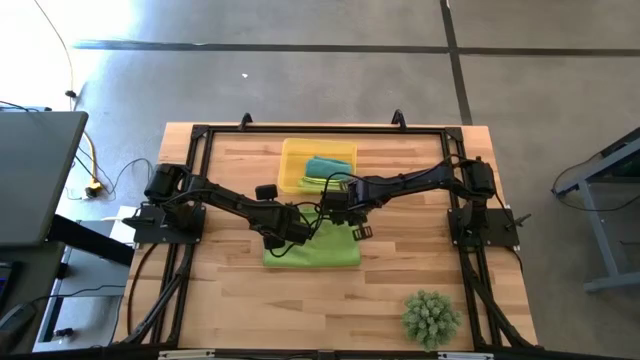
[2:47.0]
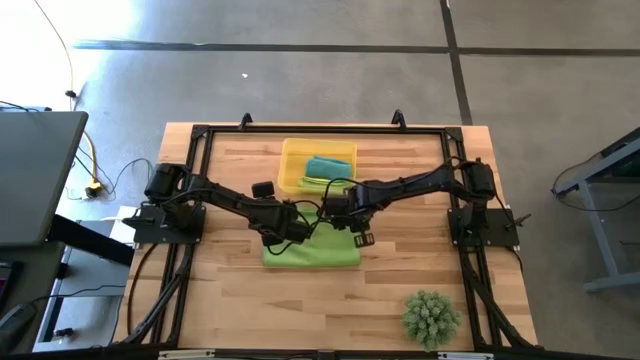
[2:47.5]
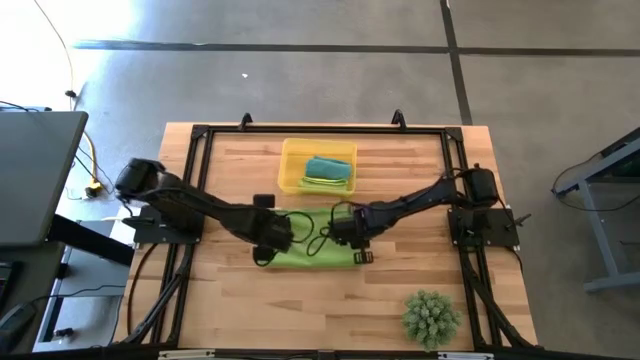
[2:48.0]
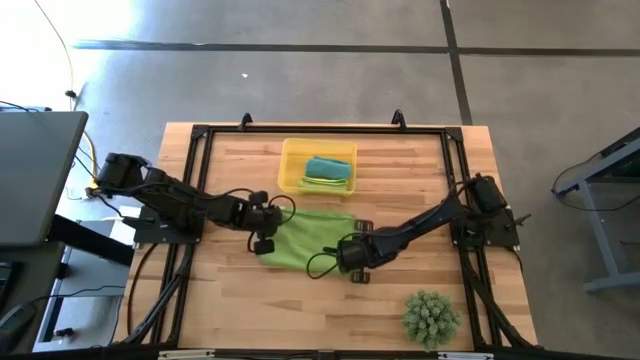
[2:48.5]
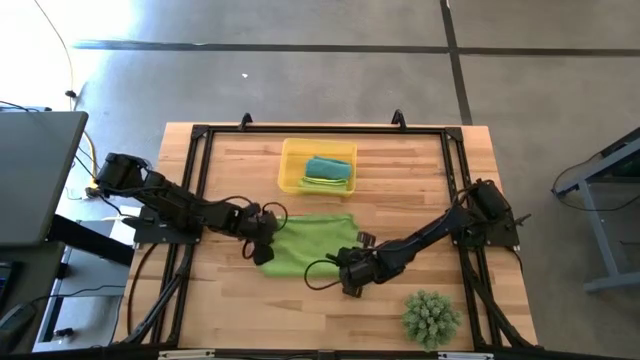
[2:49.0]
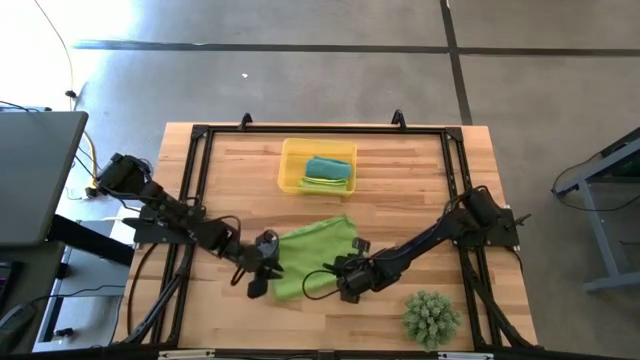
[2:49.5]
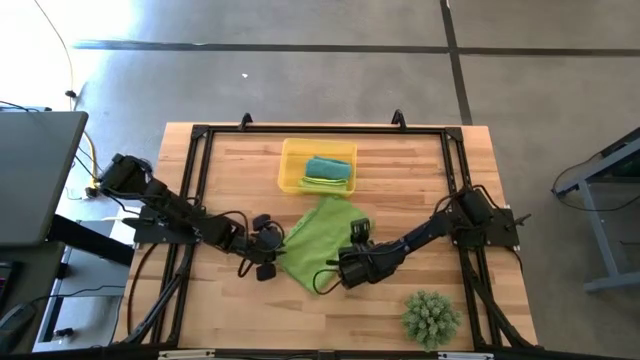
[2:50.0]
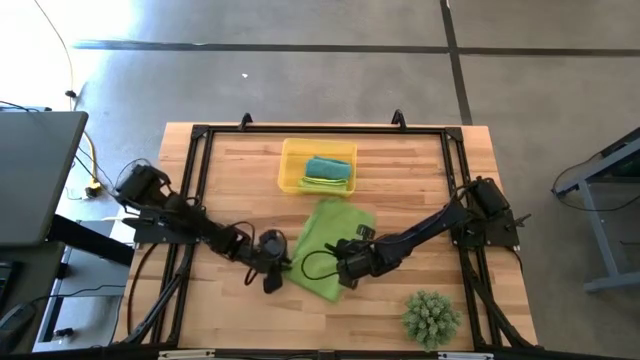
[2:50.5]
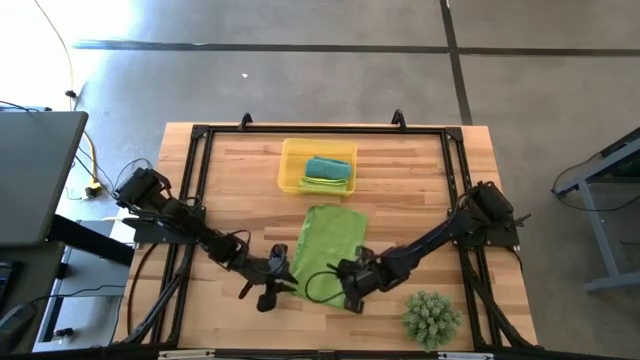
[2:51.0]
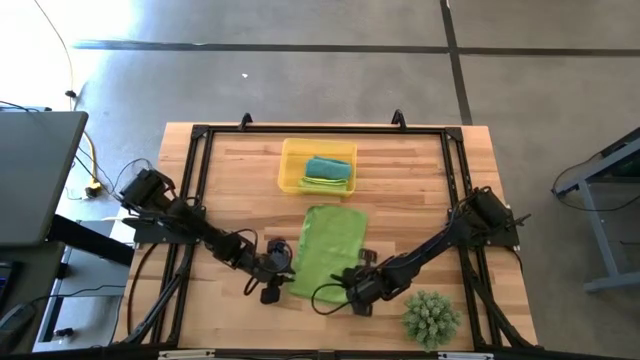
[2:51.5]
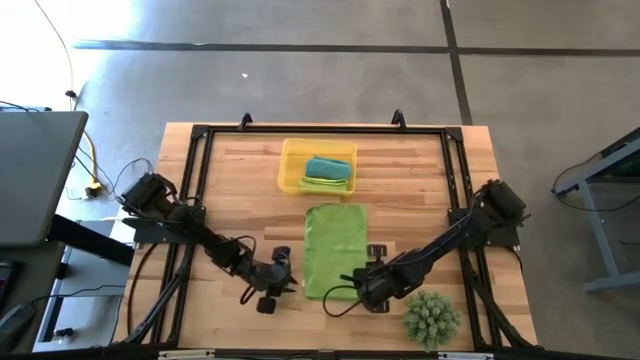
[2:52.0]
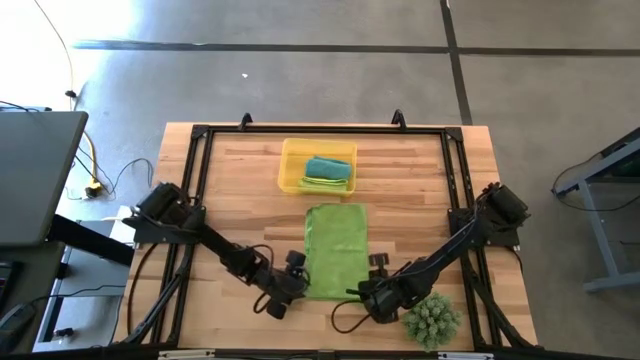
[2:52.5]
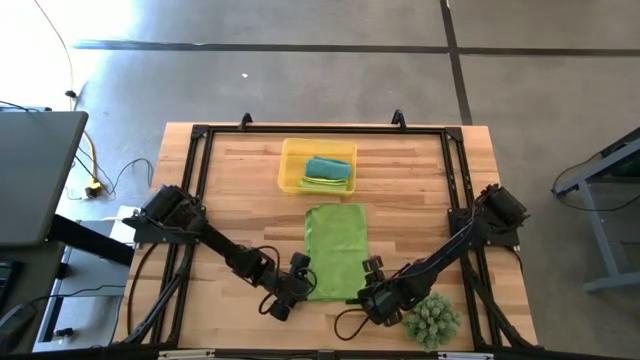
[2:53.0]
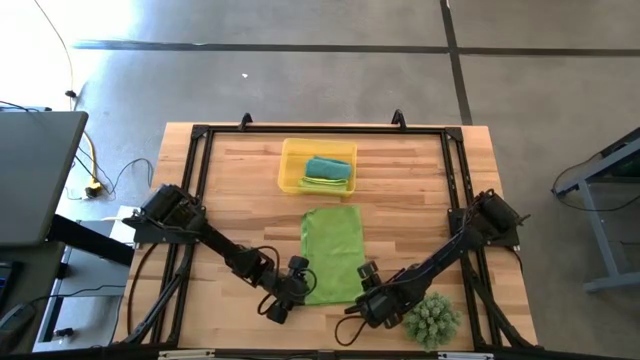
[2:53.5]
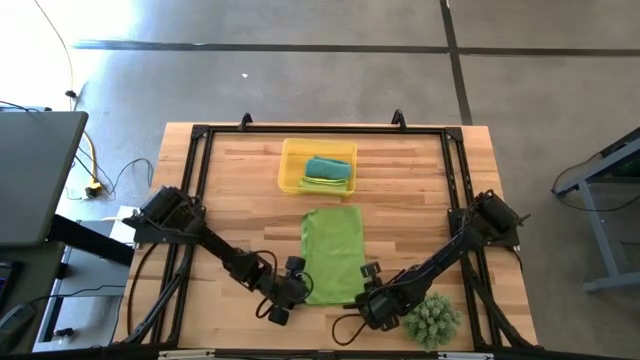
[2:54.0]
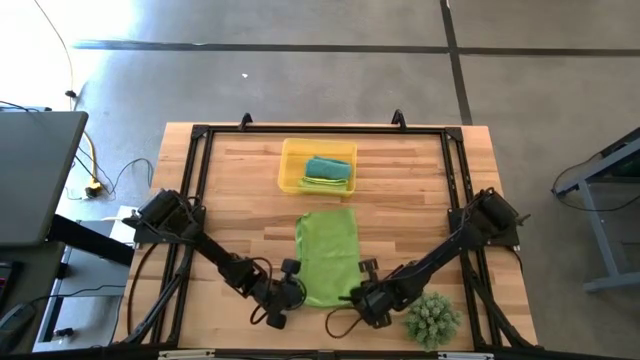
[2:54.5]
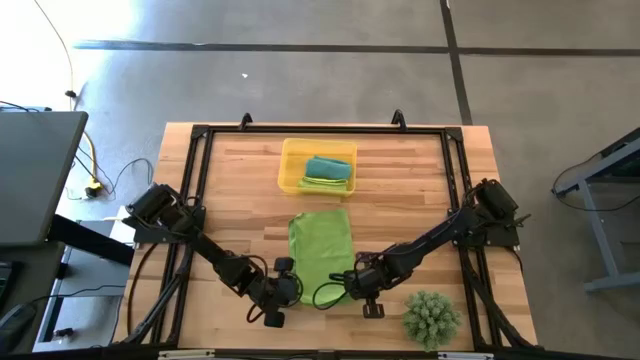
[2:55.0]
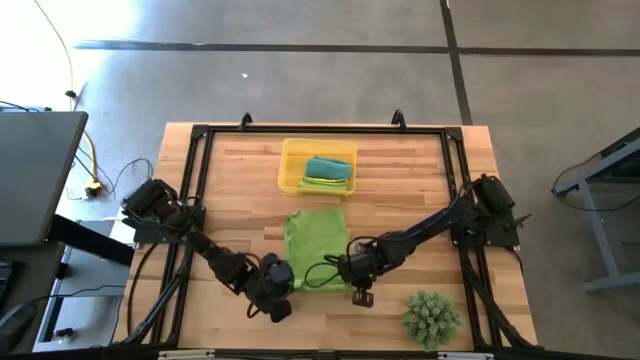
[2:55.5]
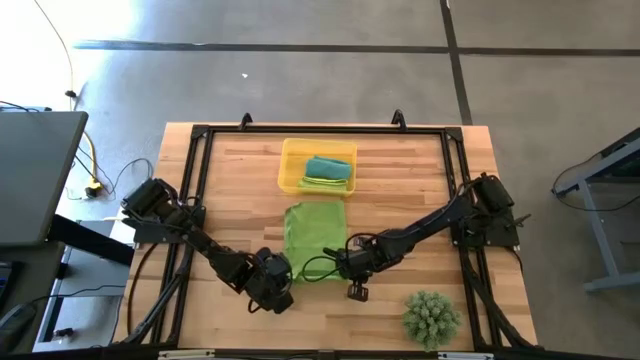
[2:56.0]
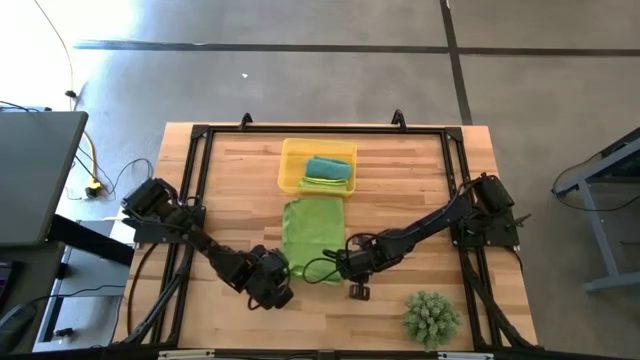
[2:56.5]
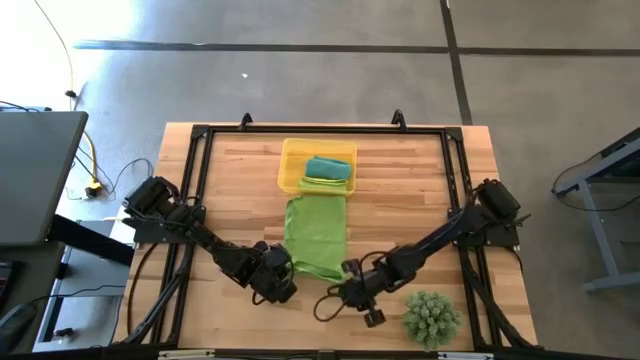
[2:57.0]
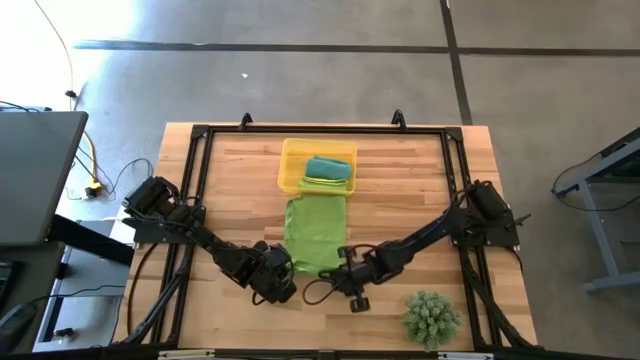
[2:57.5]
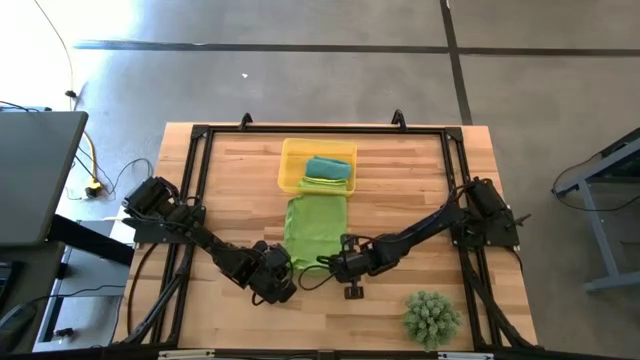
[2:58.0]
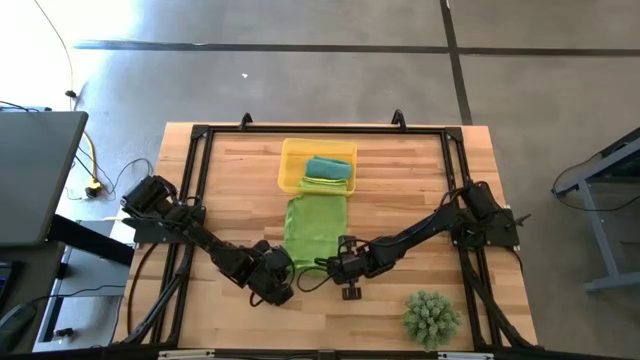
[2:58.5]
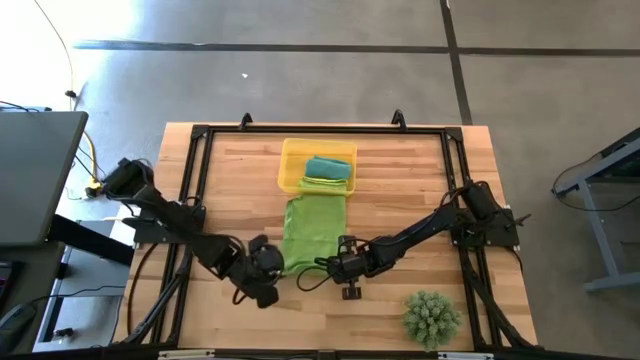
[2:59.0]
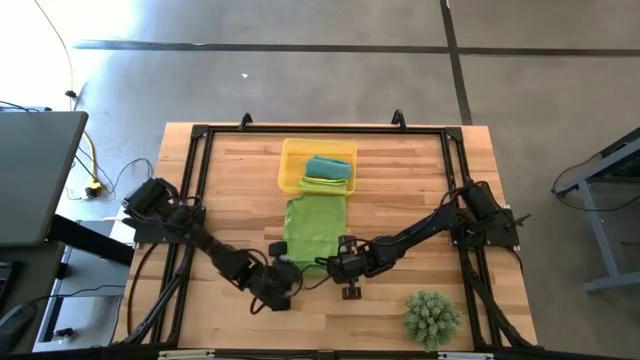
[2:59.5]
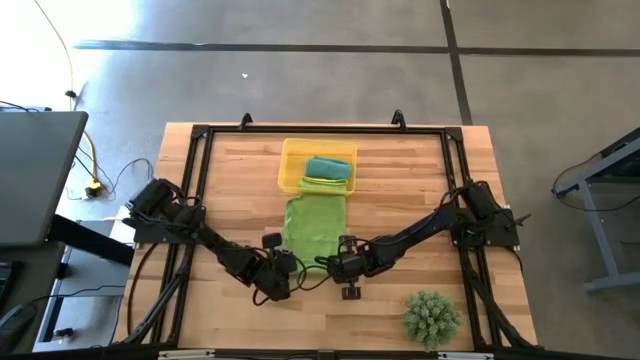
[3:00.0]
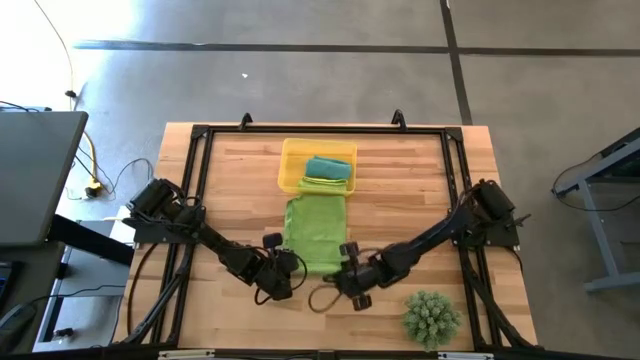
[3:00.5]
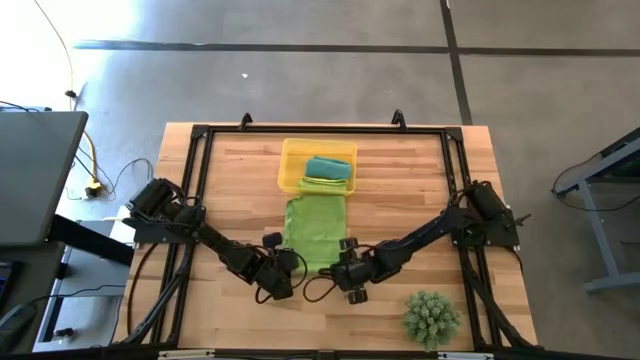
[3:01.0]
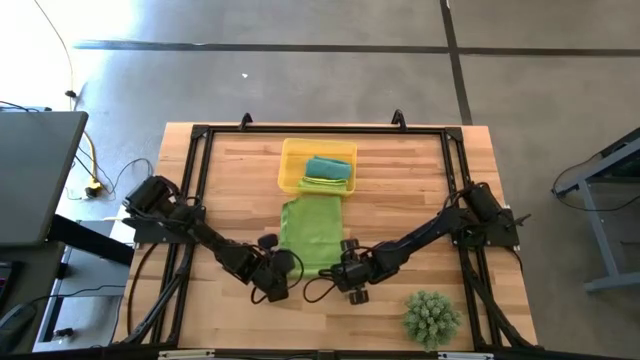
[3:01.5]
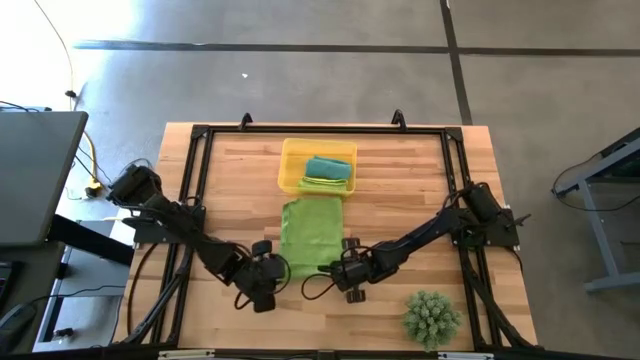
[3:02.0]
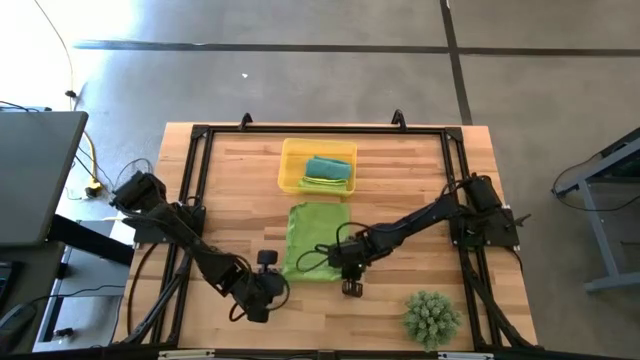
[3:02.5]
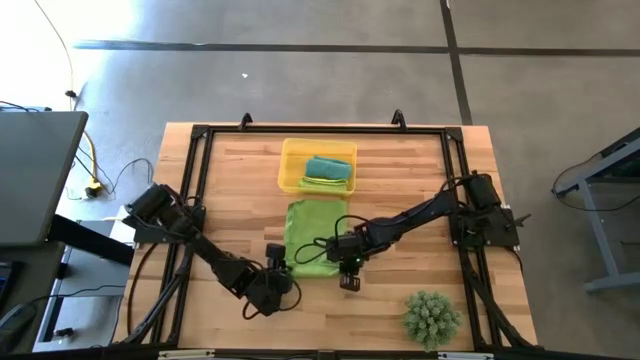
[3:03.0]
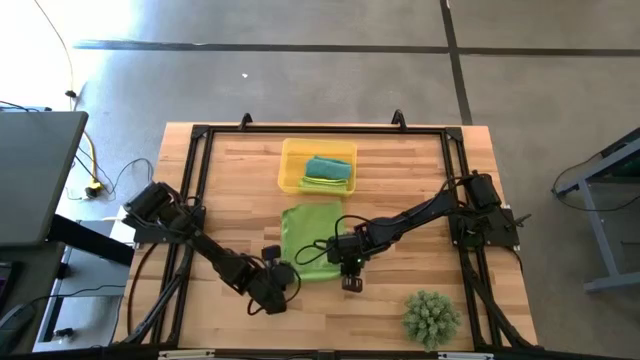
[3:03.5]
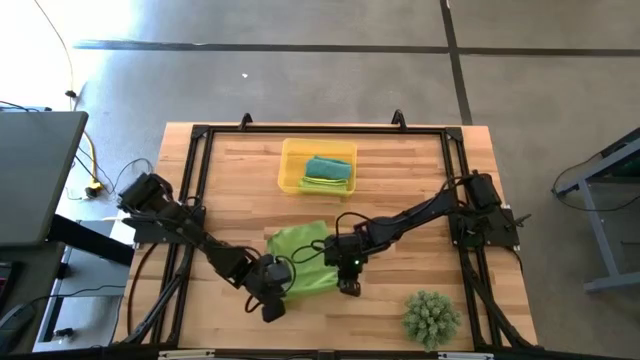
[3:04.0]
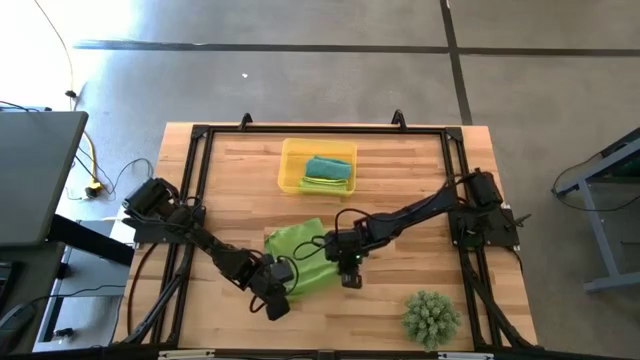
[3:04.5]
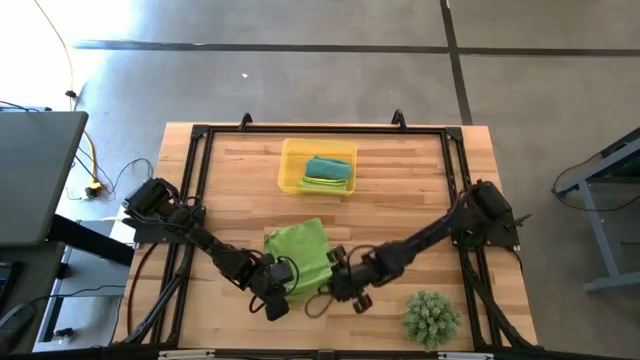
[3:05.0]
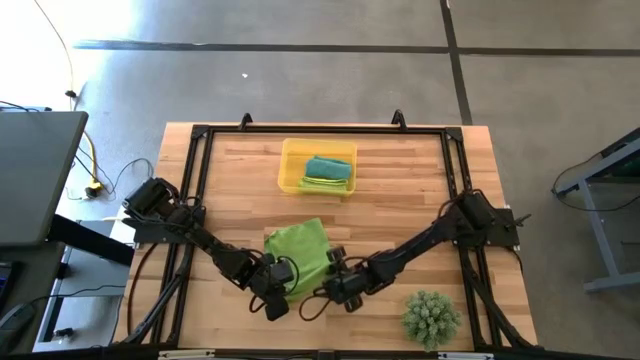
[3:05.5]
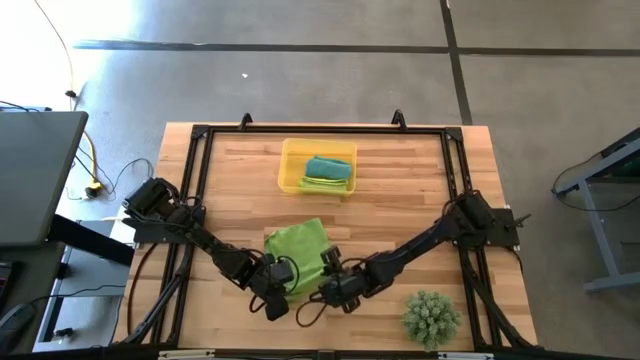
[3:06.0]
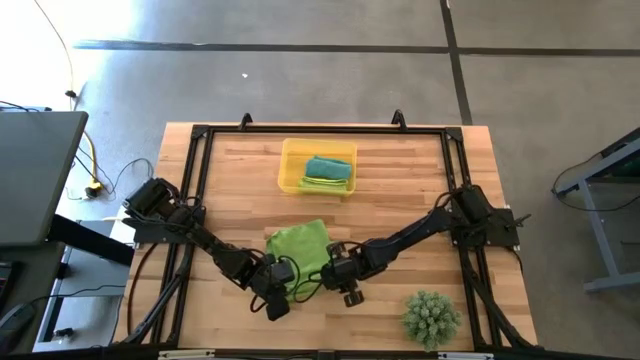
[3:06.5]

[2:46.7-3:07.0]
Task: Roll microfiber towels into tight, uniform cylinder then place into a basket
Roll the green microfiber towel
